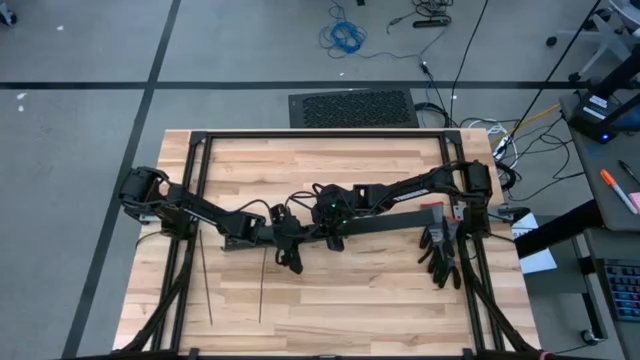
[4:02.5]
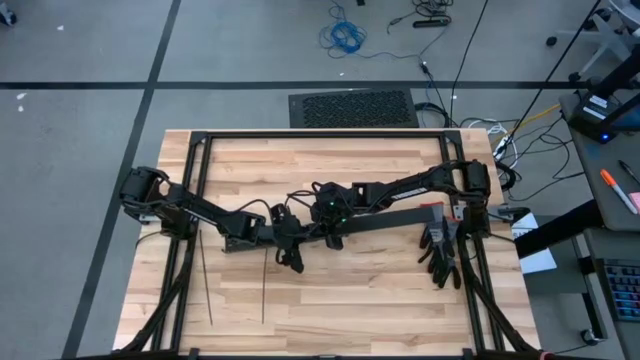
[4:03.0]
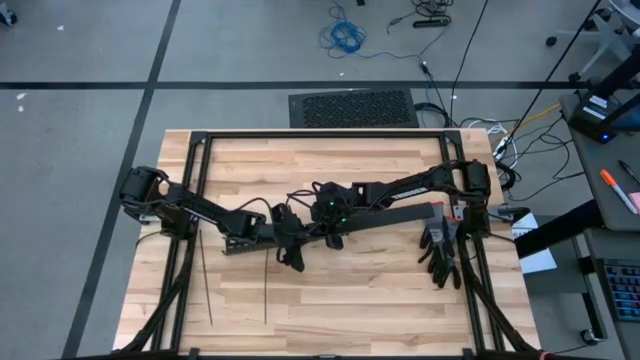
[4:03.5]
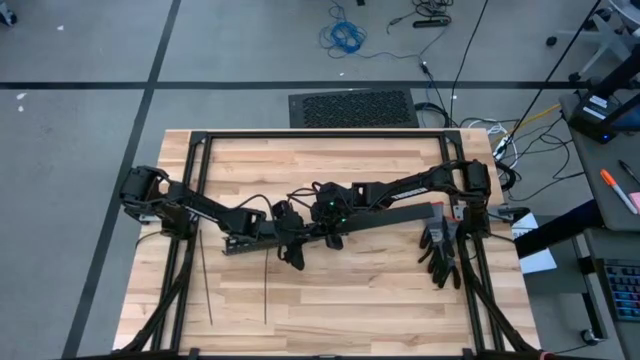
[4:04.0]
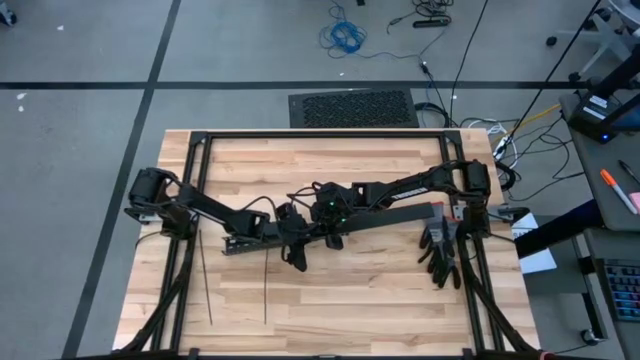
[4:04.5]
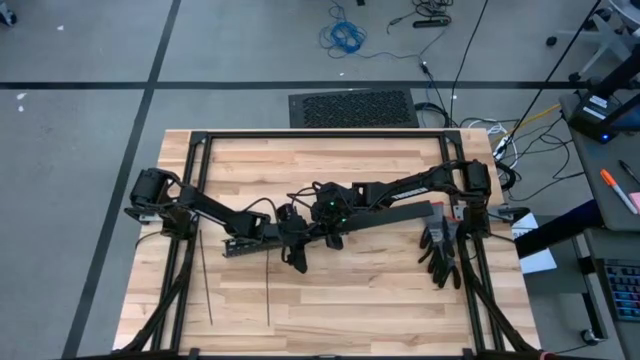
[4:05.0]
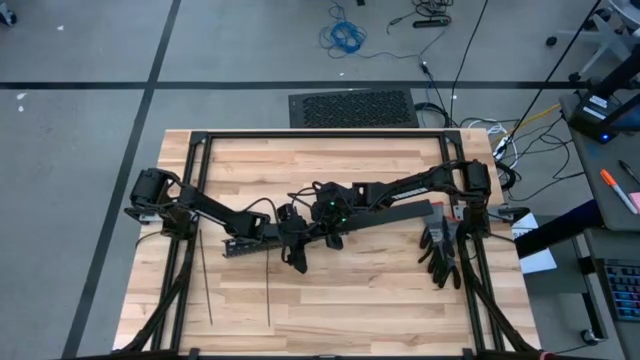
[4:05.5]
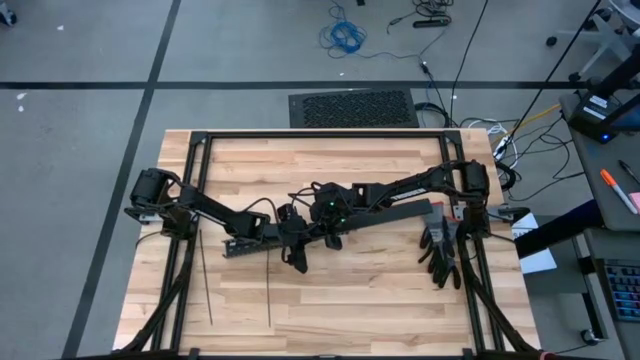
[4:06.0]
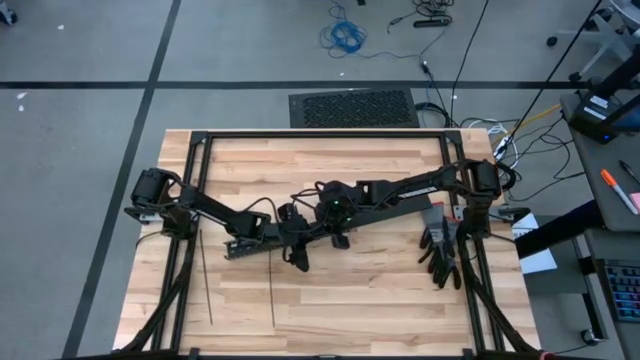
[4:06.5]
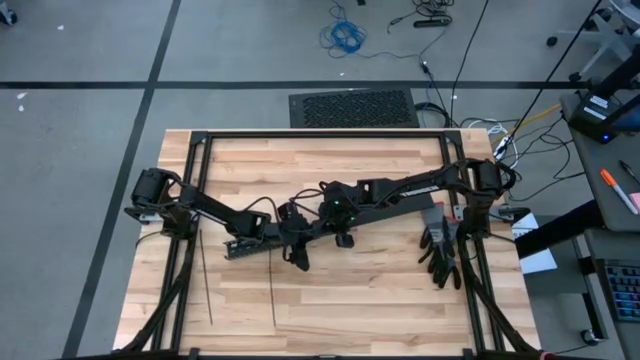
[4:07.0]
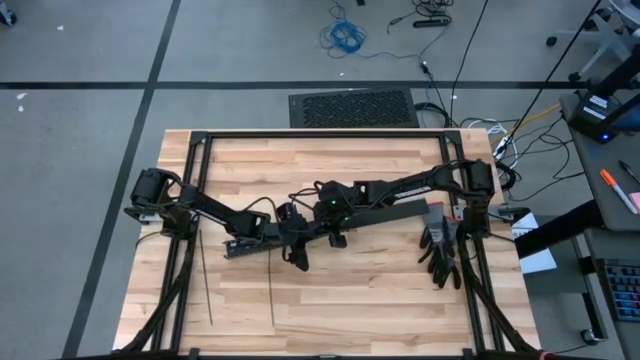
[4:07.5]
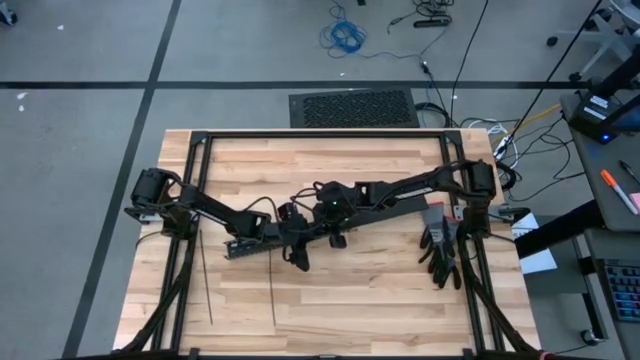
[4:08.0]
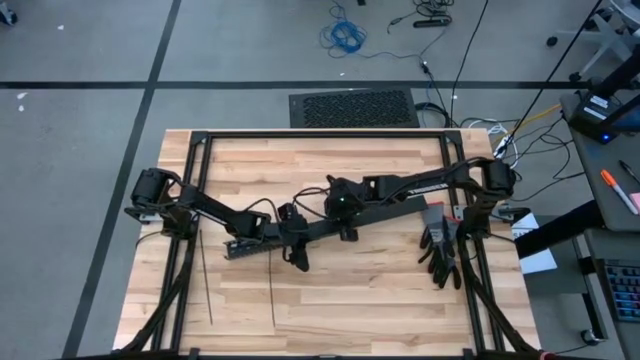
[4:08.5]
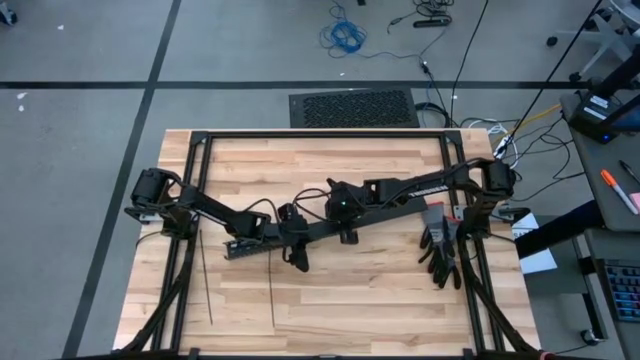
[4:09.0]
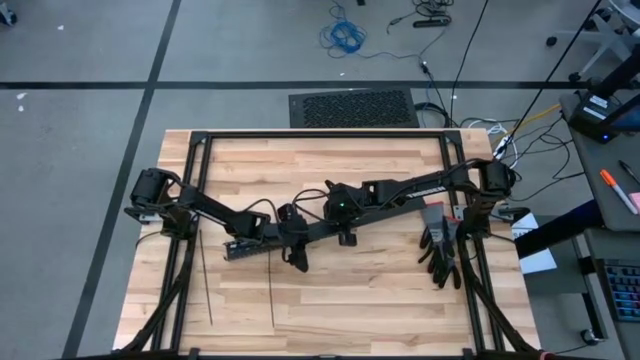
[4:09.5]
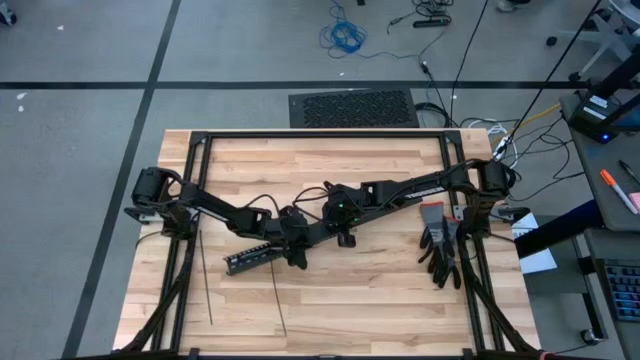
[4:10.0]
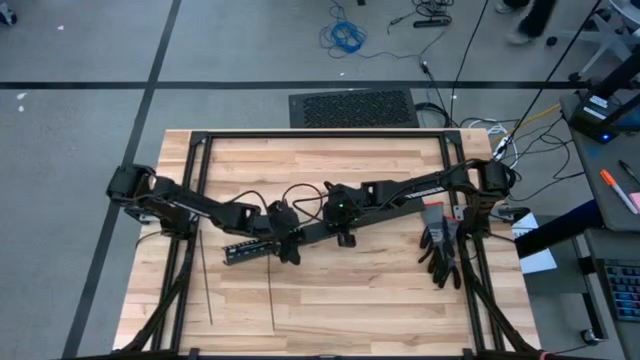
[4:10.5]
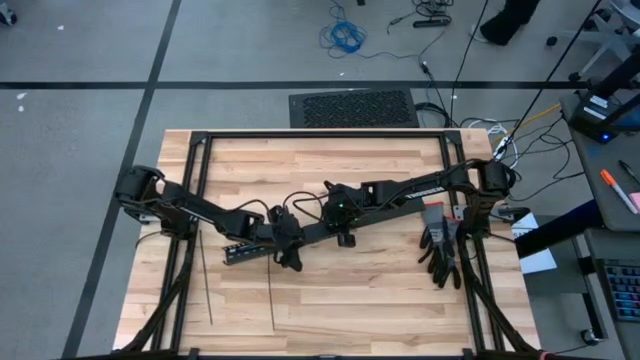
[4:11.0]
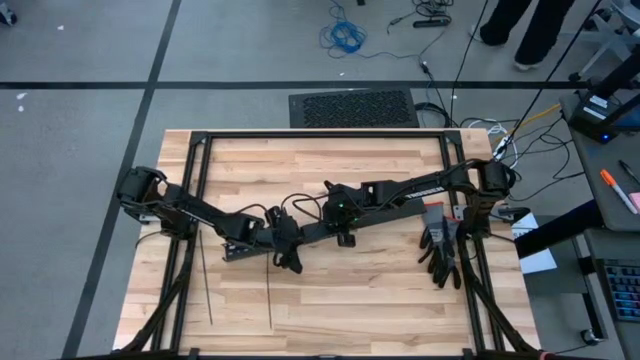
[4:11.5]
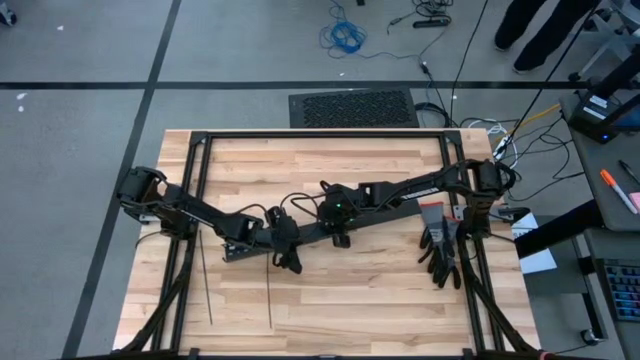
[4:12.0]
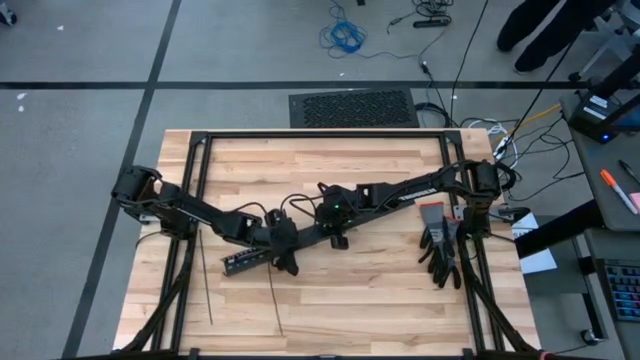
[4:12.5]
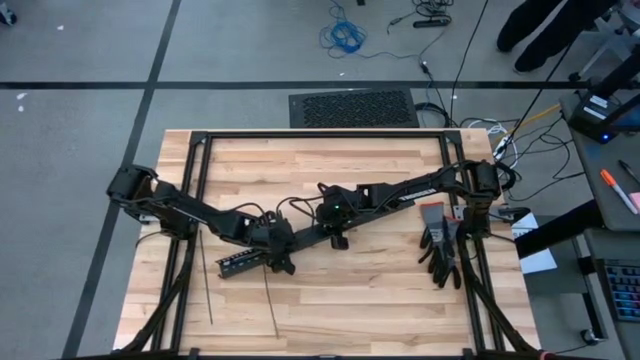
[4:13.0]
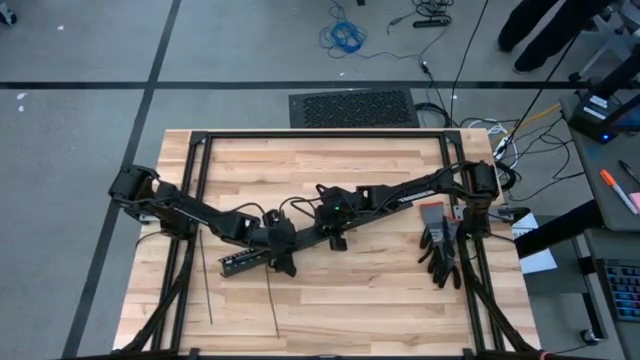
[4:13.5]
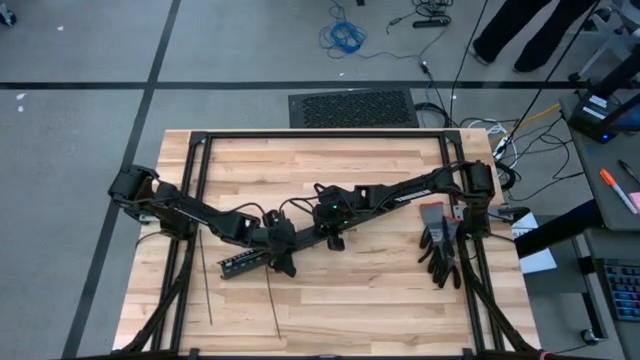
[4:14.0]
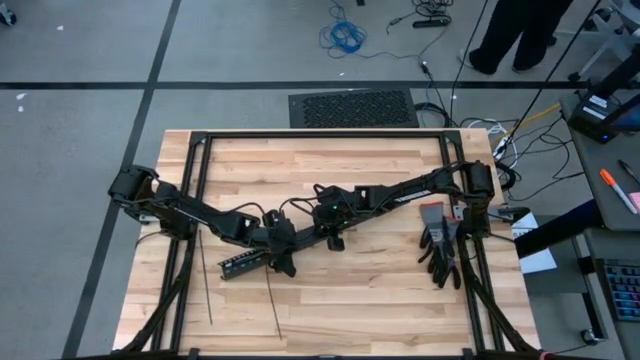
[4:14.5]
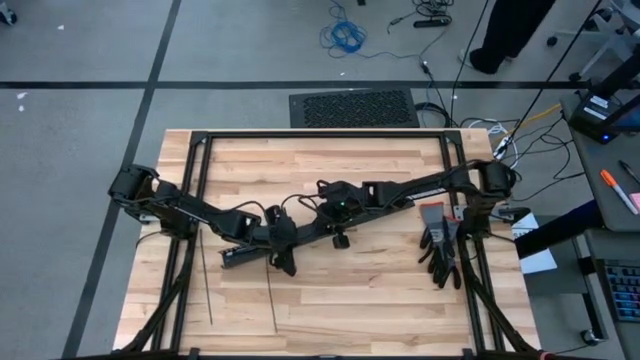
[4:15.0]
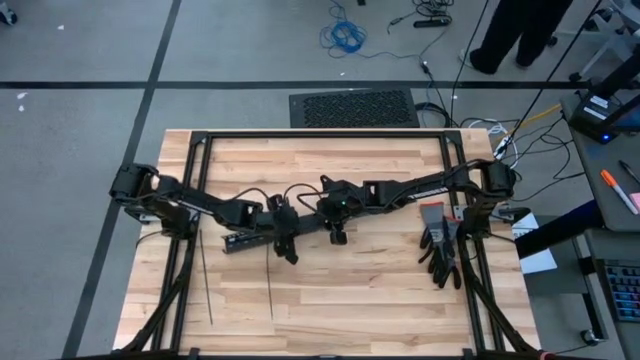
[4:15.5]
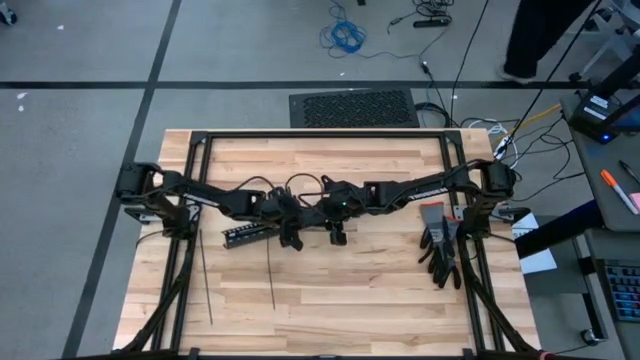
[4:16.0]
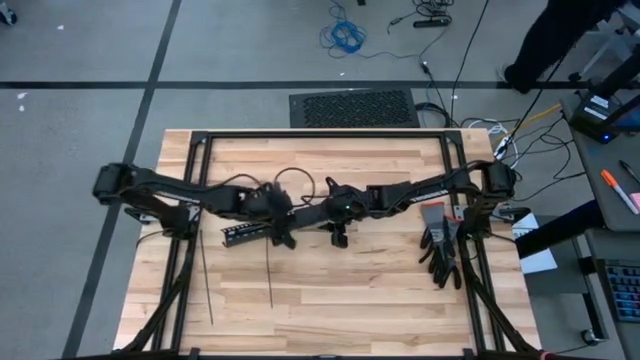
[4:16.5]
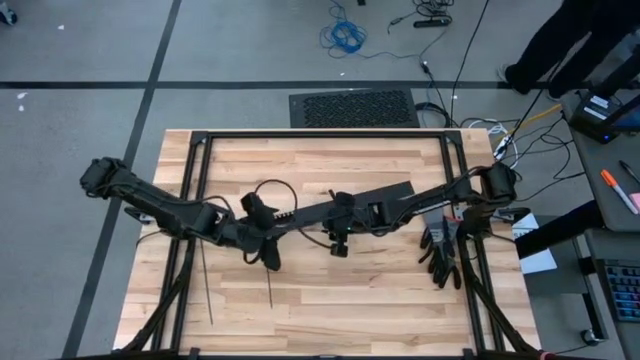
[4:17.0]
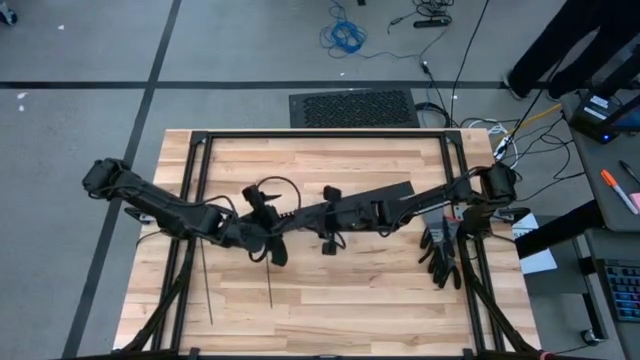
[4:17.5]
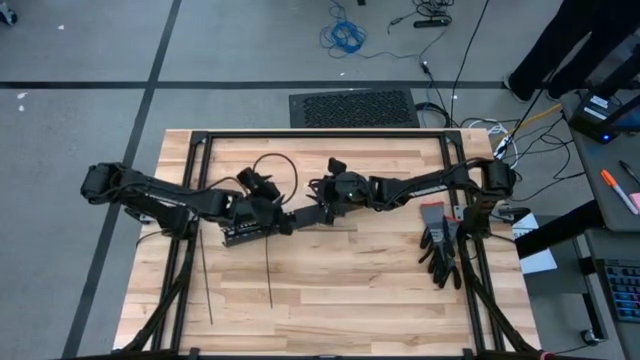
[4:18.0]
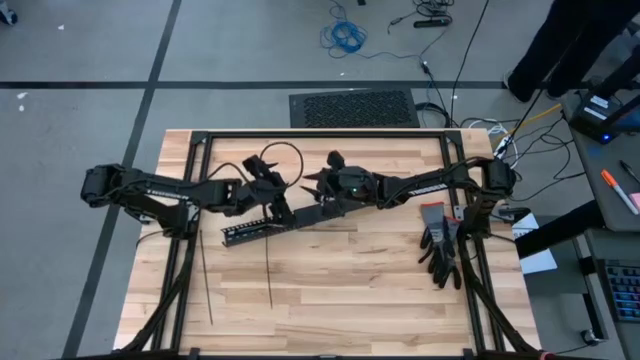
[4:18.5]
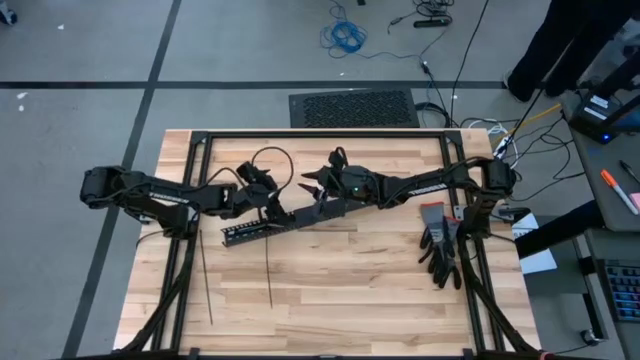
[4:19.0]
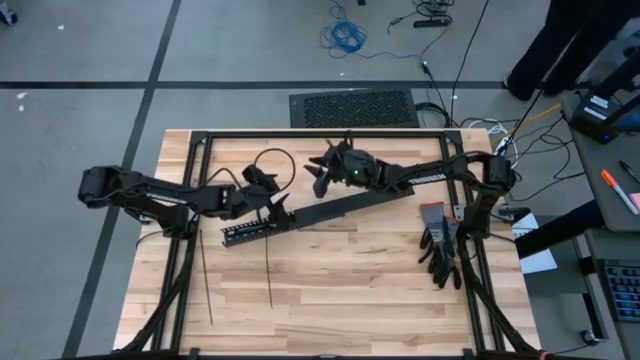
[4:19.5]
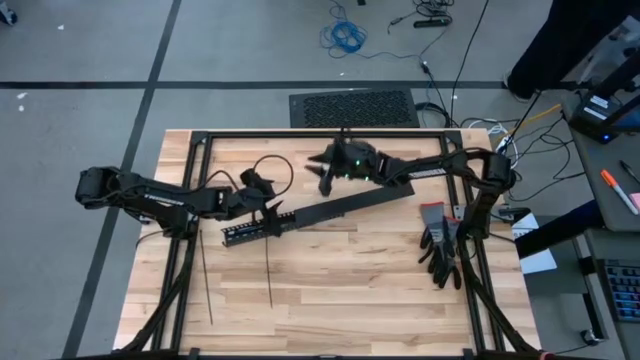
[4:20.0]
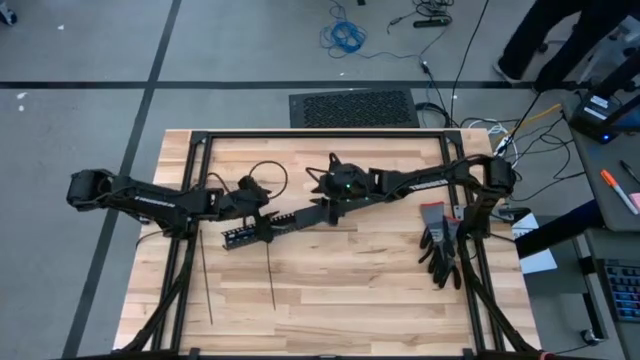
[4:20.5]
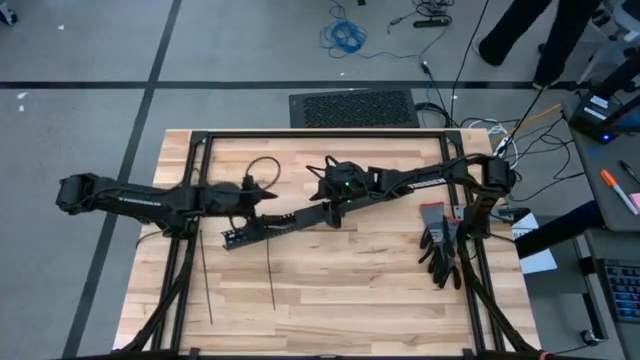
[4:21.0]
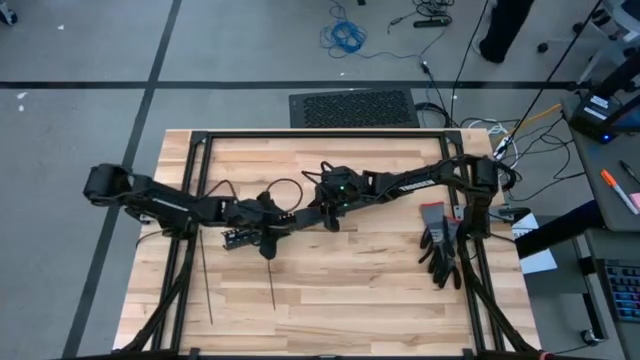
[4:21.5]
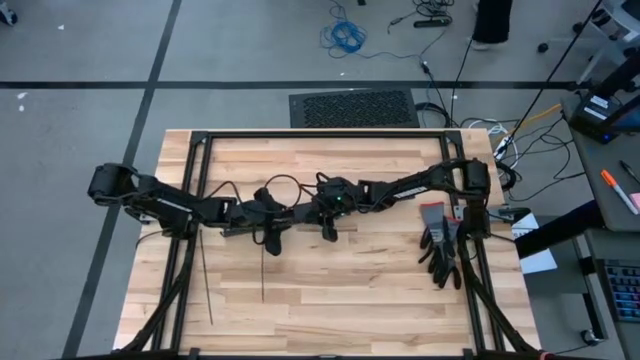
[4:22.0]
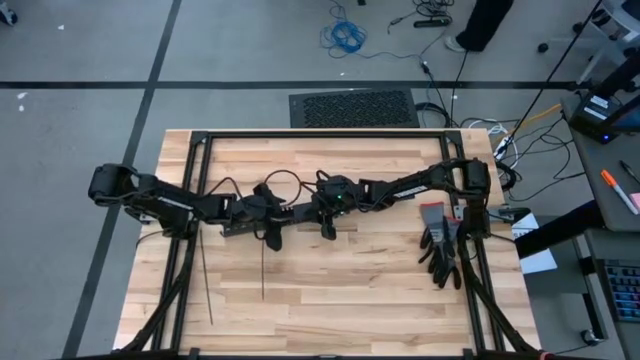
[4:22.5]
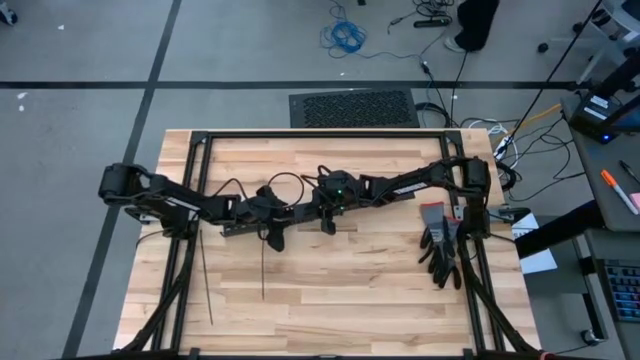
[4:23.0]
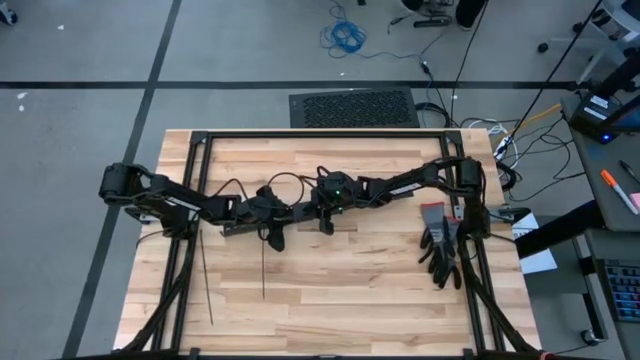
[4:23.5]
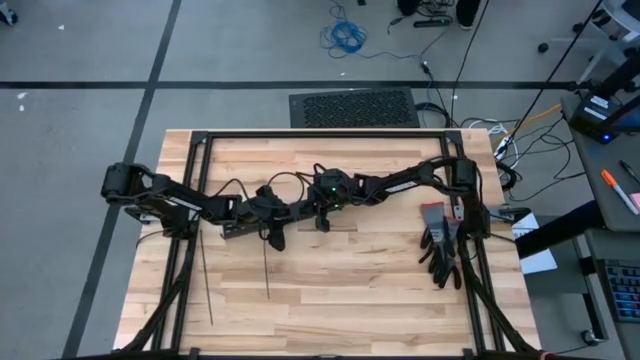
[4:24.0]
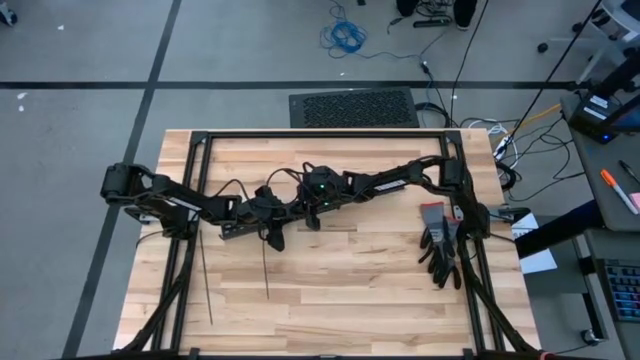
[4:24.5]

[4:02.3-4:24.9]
Task: Ziptie cables
Close the black cable duct with the cable duct cover
